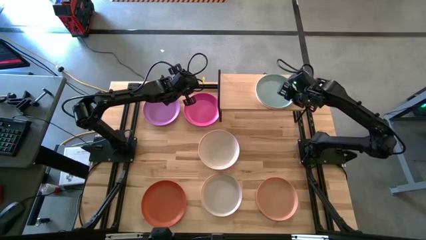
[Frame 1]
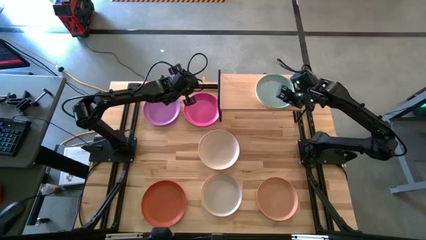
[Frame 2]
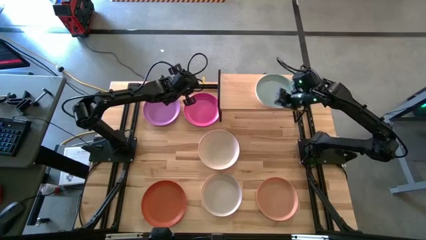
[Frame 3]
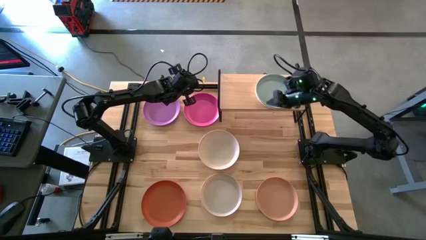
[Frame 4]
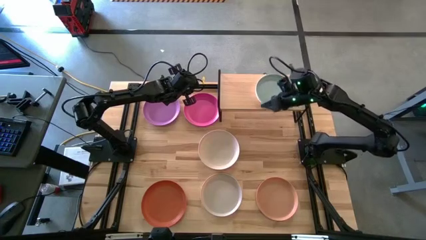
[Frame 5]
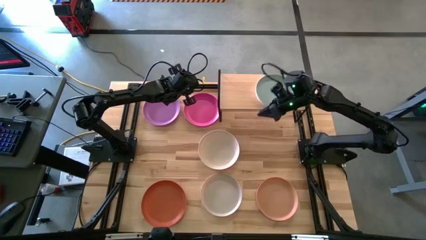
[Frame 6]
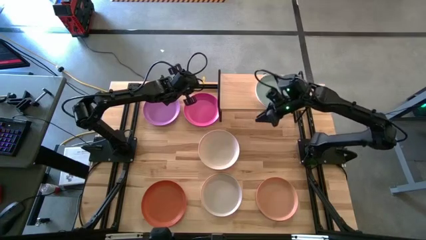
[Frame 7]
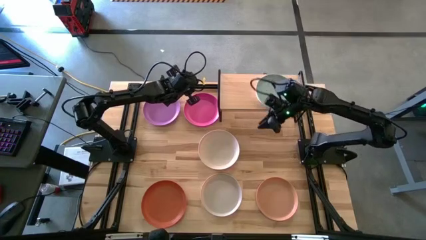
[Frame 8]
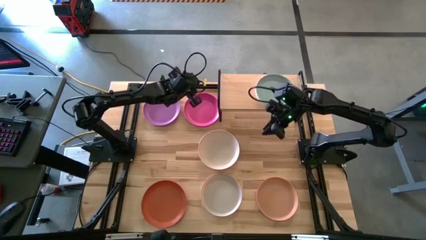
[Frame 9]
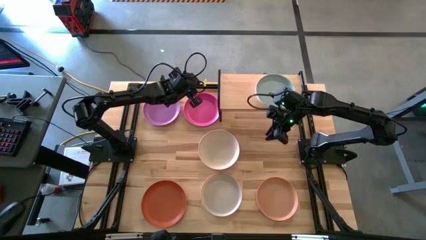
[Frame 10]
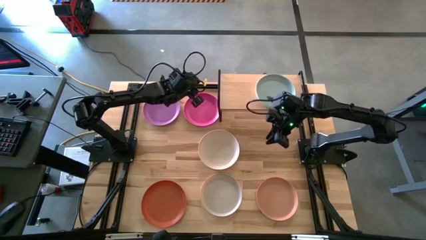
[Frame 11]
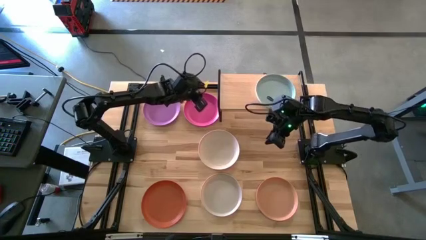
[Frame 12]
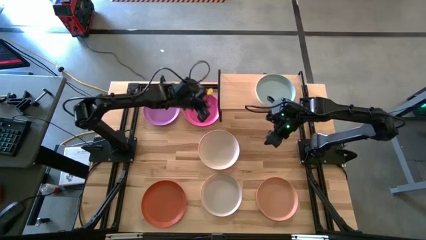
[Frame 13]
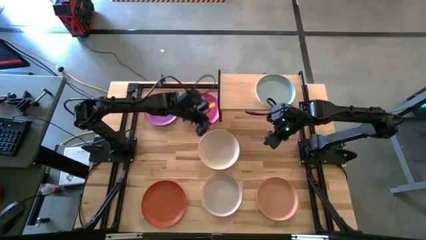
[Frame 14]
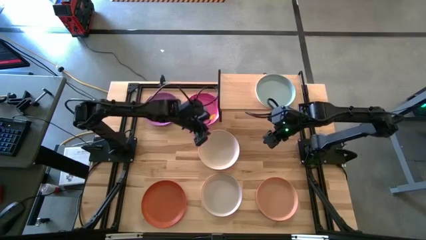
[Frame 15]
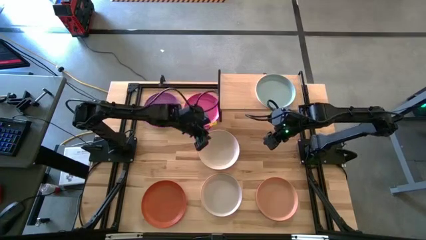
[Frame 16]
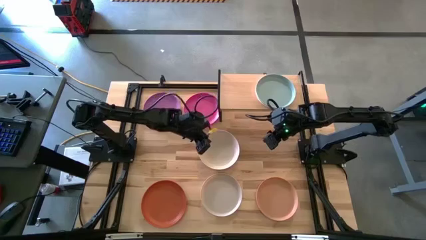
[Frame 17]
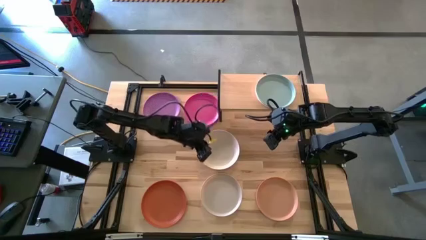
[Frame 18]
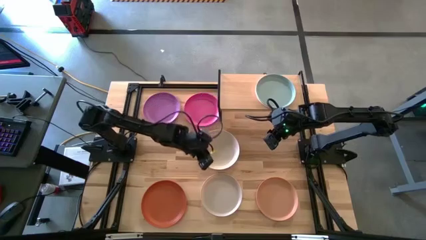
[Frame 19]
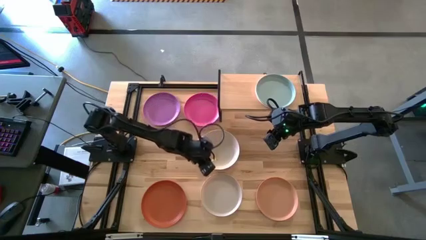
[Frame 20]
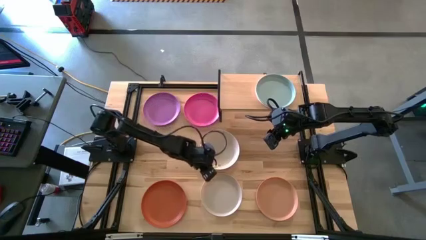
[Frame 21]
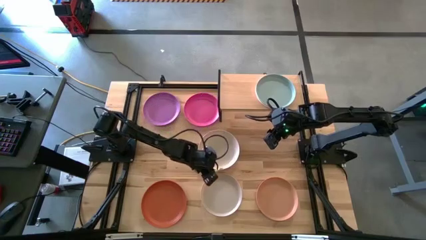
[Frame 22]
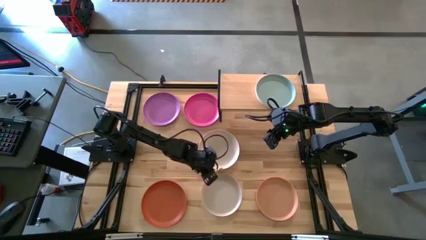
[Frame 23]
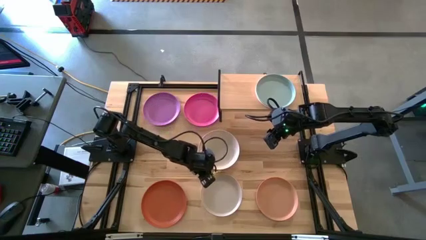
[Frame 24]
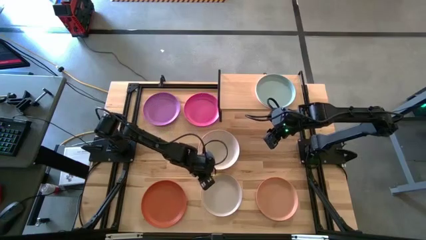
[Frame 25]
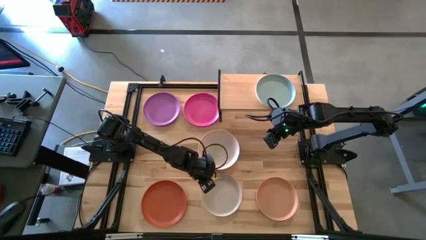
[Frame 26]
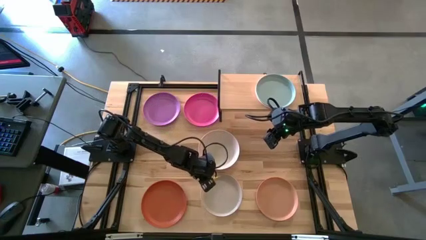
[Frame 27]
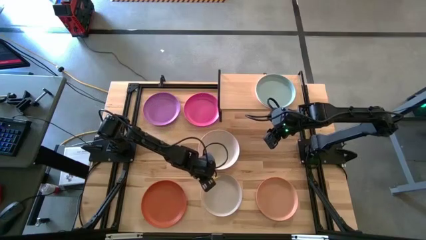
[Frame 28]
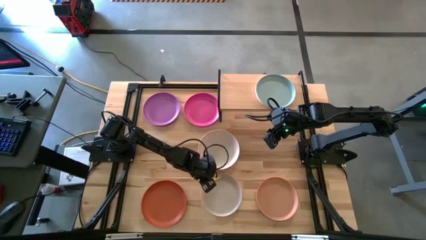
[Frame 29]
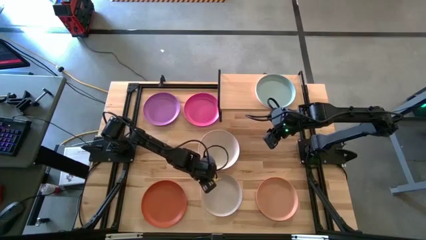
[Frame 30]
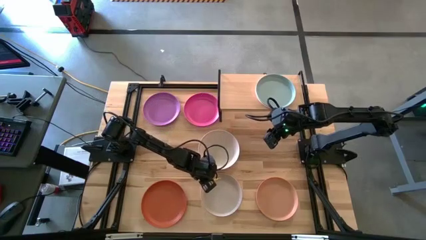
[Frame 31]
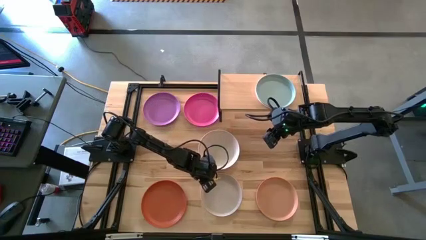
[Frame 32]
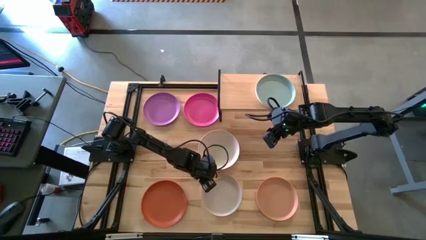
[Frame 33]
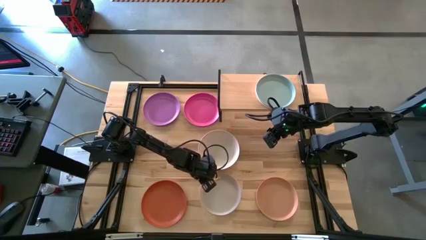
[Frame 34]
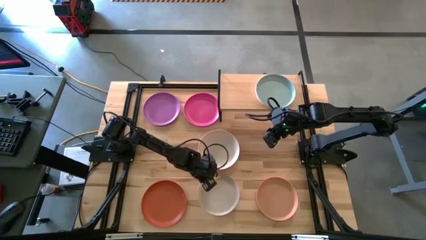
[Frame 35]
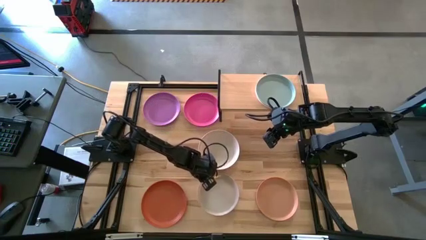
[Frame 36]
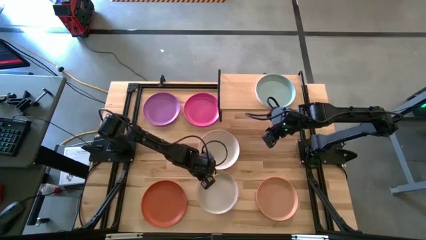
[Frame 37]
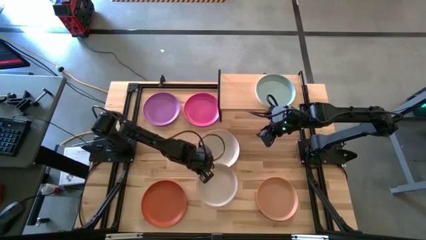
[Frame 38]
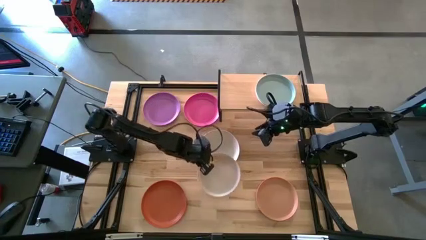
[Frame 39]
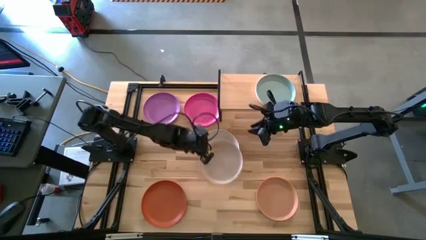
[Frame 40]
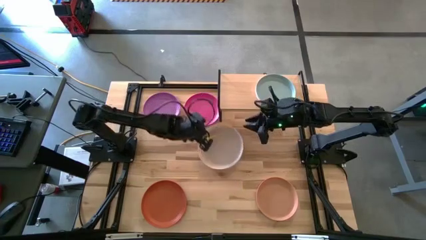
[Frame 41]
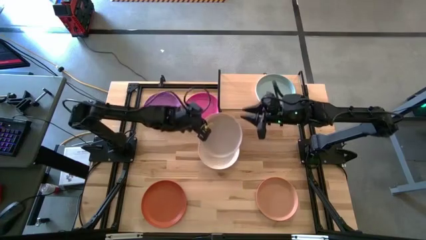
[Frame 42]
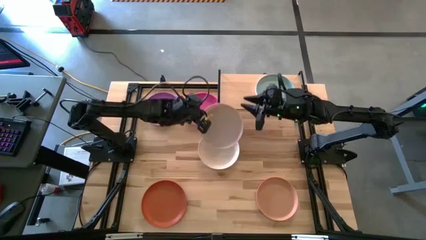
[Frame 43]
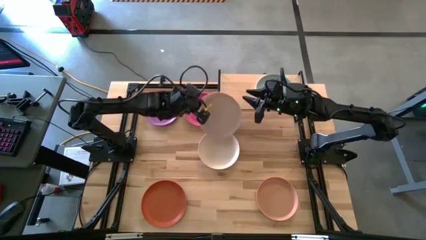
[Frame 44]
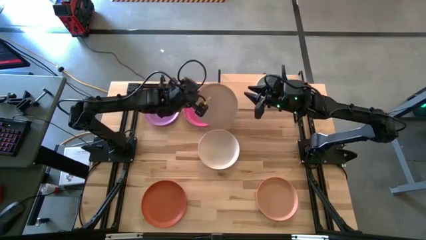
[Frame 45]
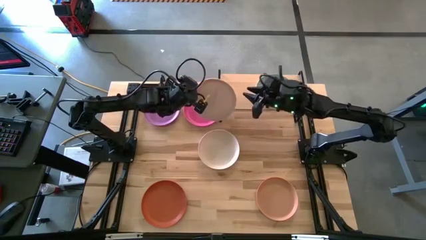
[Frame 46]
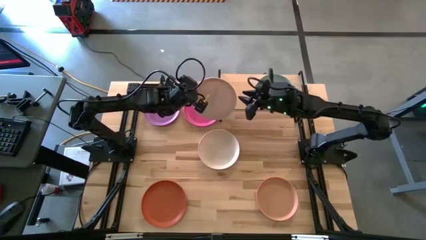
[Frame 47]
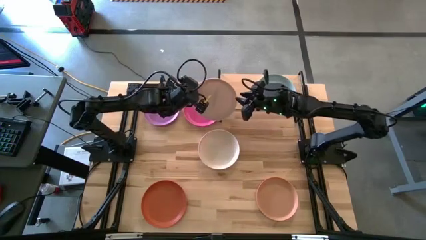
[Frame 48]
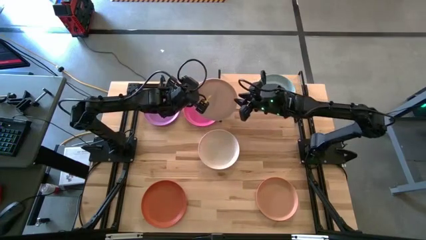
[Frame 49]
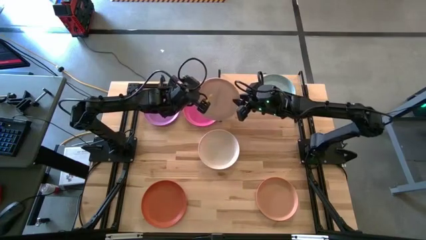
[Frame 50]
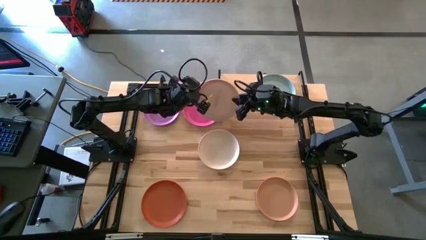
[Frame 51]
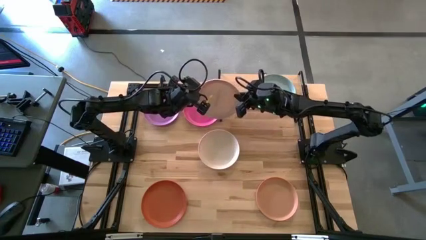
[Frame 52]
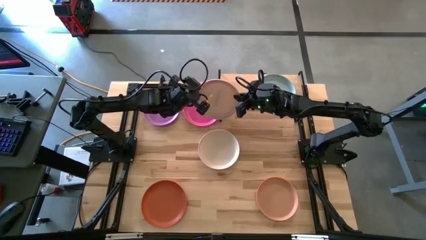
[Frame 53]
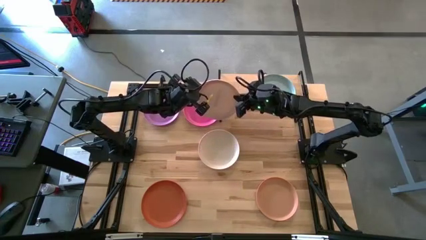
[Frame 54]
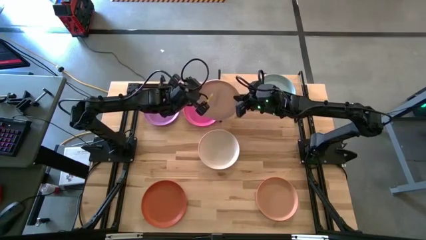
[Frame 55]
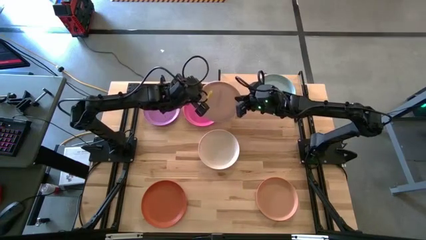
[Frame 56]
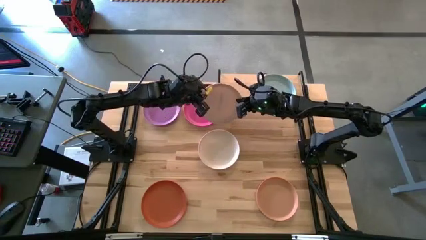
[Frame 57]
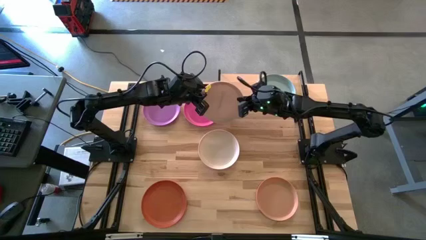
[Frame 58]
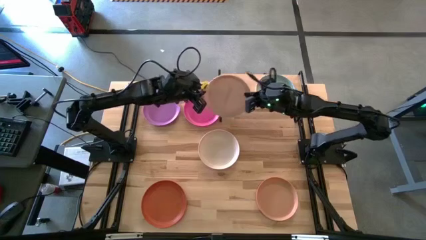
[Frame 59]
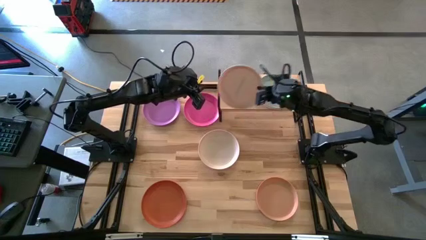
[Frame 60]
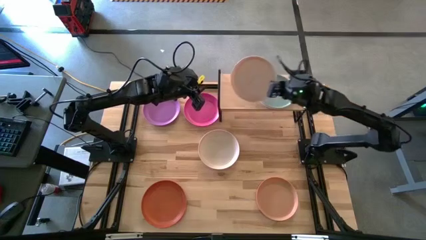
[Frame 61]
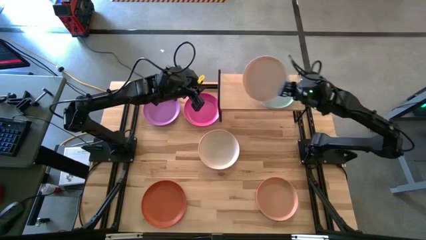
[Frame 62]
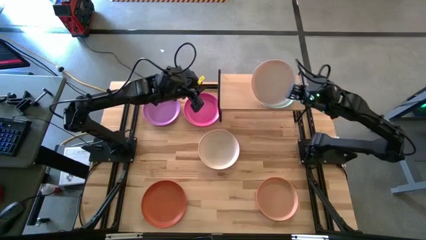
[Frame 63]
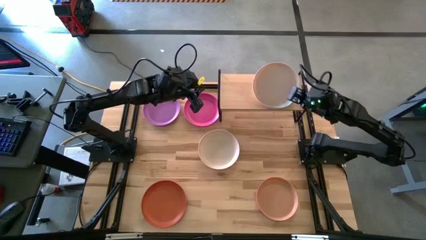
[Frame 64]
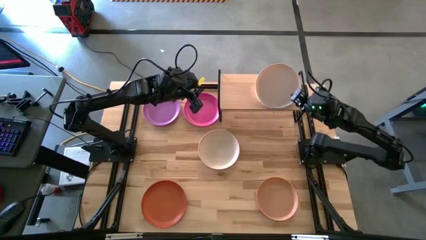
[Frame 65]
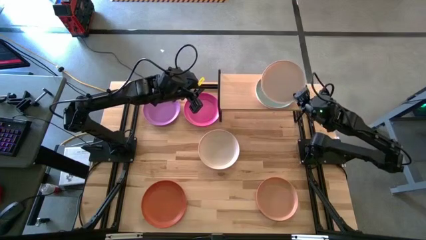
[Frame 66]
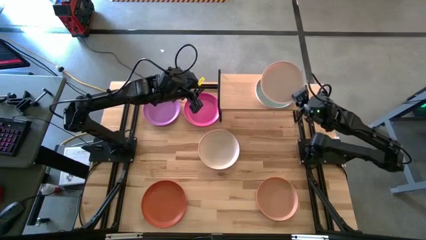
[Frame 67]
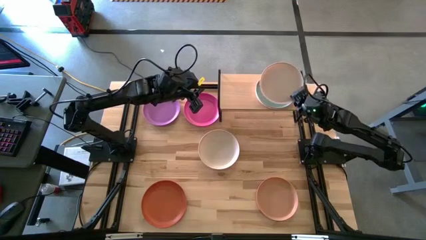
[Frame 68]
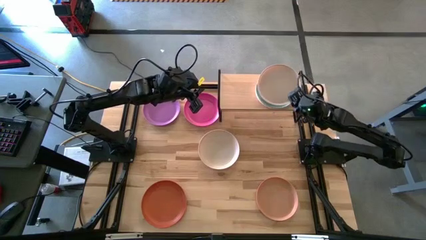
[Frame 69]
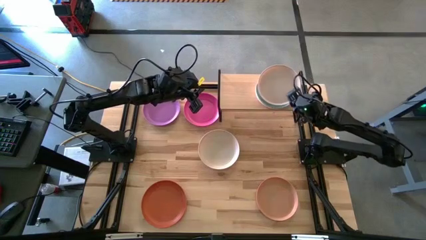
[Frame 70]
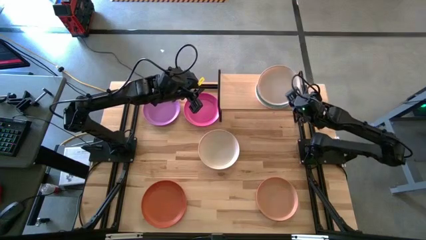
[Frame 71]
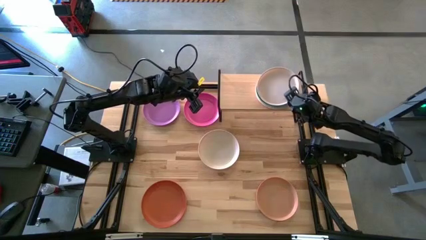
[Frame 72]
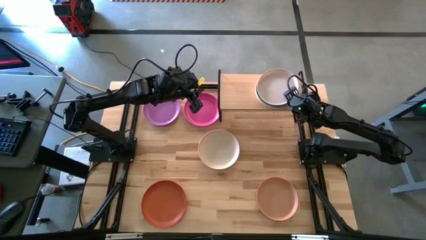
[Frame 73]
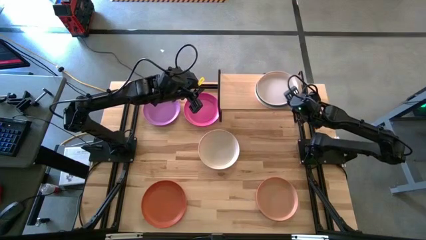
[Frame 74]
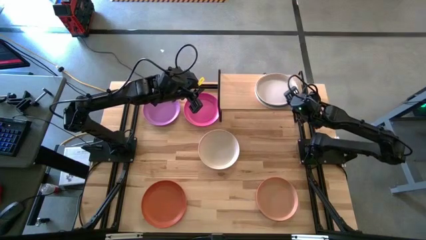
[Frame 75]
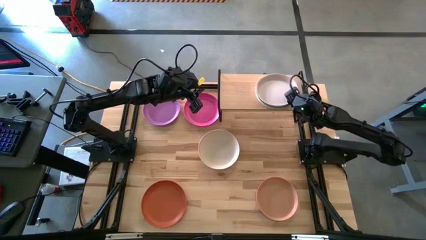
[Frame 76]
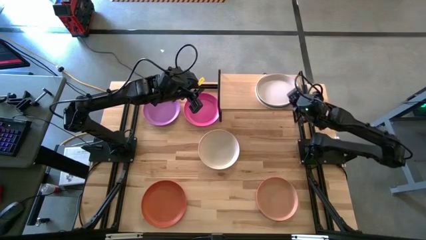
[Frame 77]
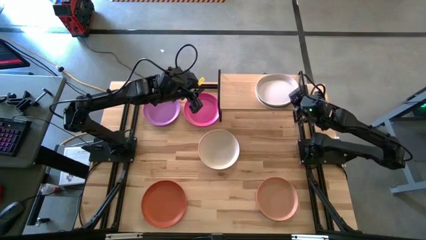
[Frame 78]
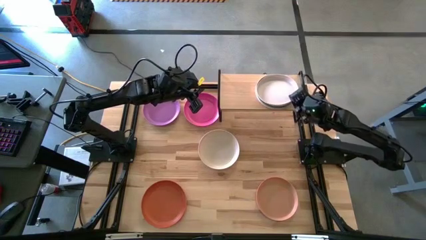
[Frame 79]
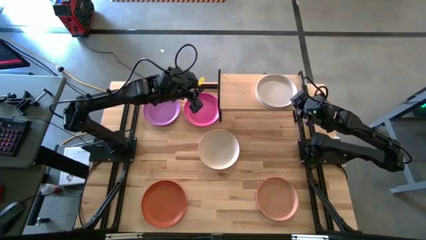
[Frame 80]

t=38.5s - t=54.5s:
Task: Place and stack plates onto a shelf
Stack the bottom white plate on top of the blue plate
